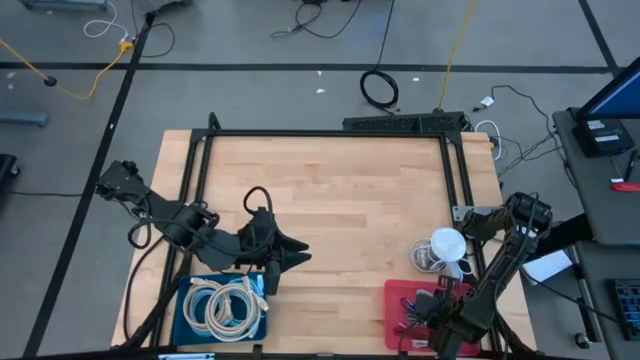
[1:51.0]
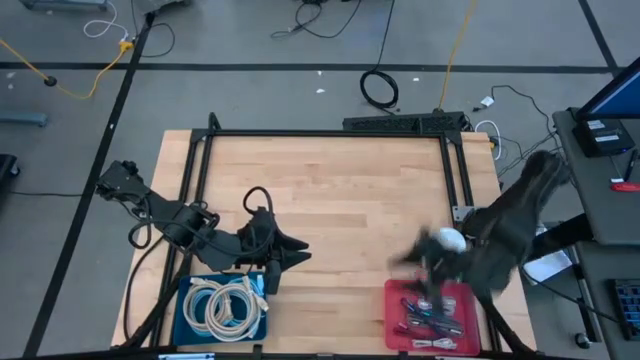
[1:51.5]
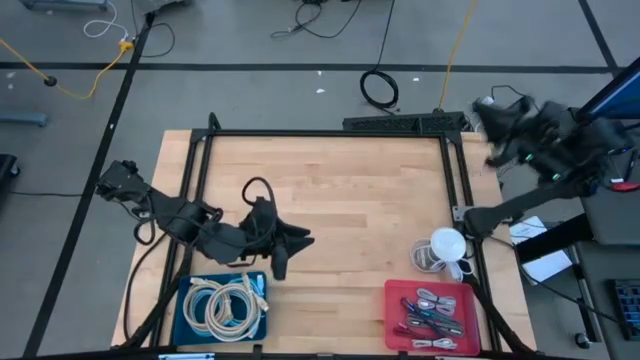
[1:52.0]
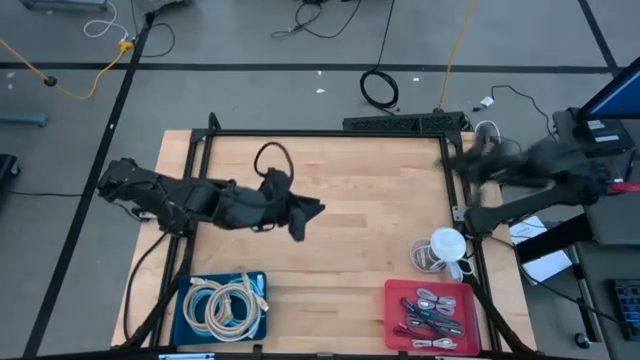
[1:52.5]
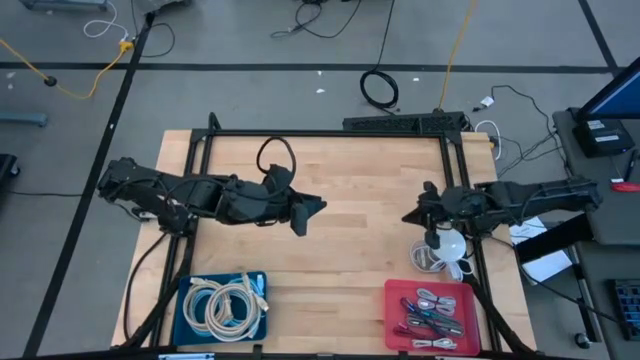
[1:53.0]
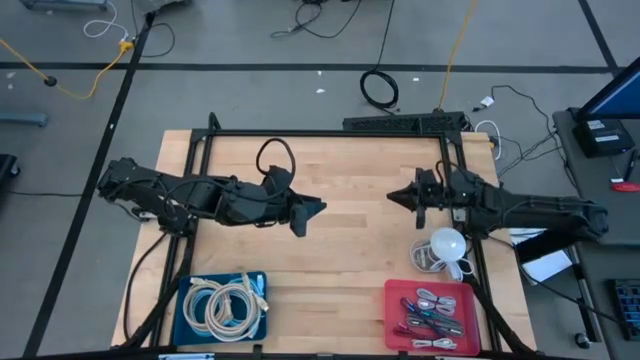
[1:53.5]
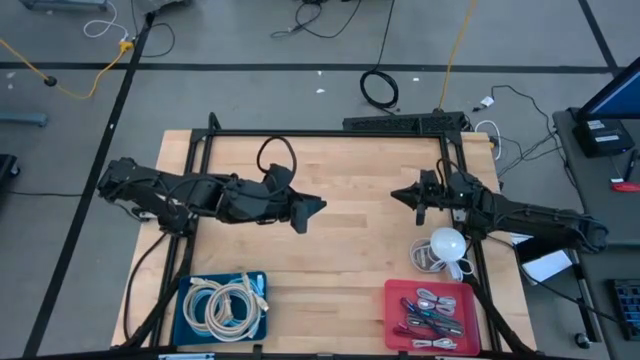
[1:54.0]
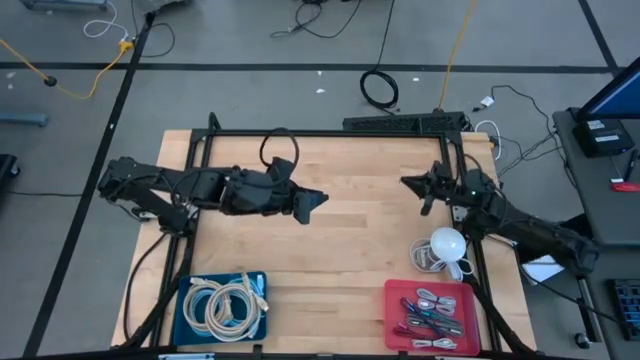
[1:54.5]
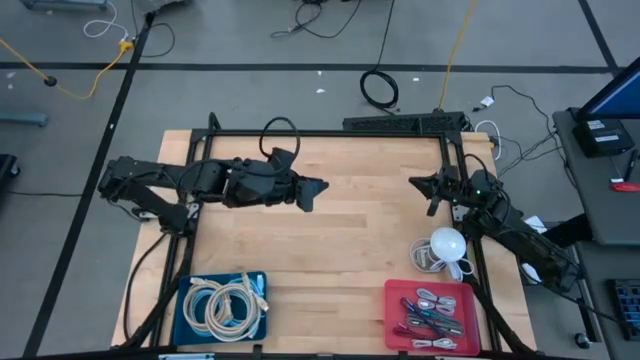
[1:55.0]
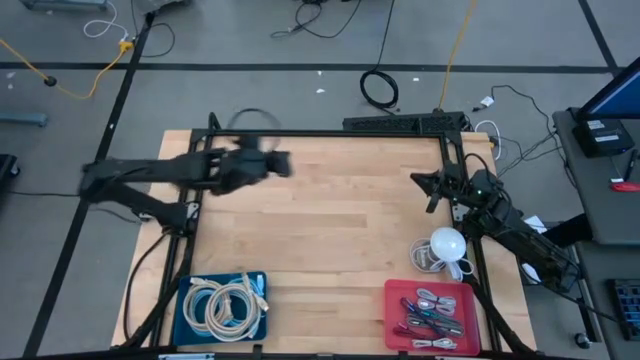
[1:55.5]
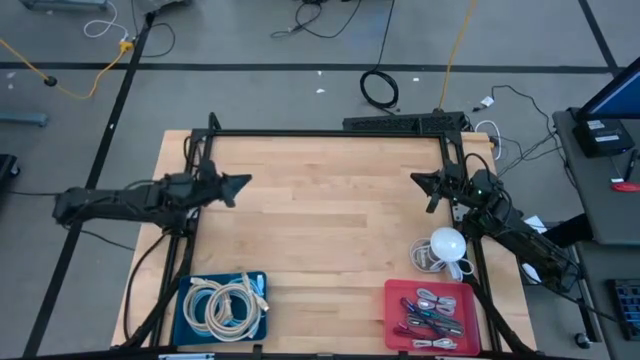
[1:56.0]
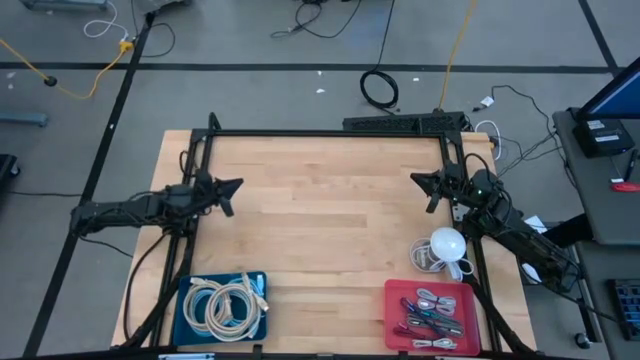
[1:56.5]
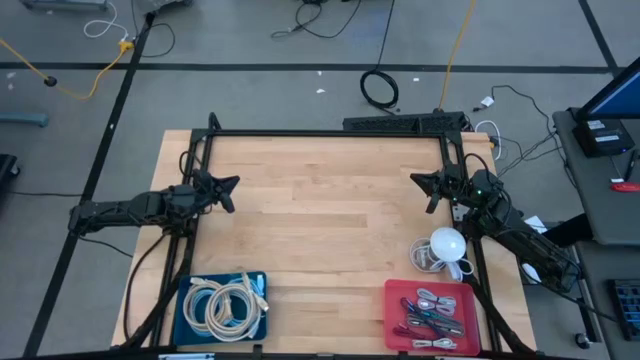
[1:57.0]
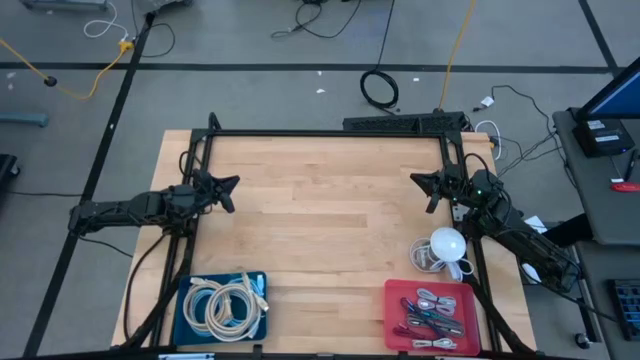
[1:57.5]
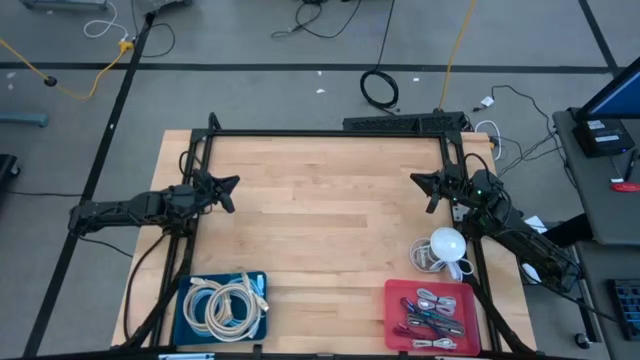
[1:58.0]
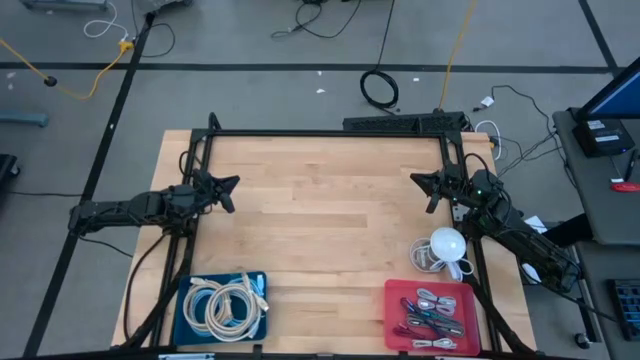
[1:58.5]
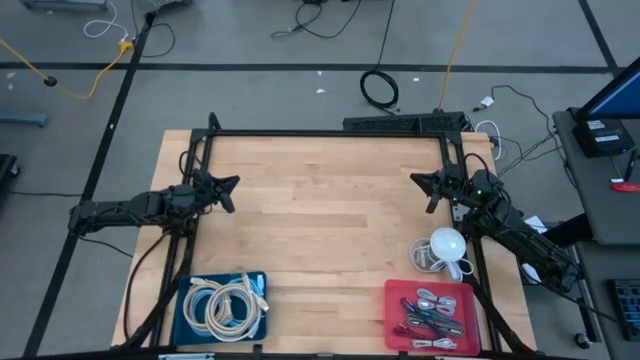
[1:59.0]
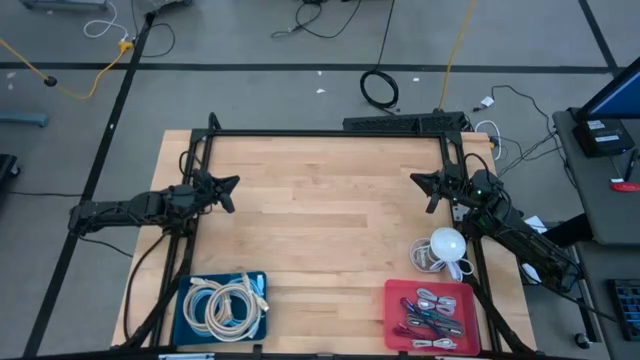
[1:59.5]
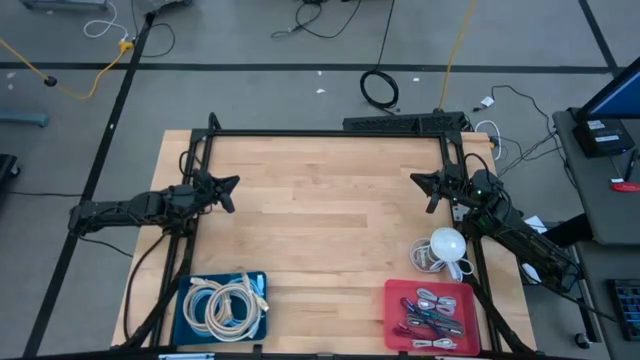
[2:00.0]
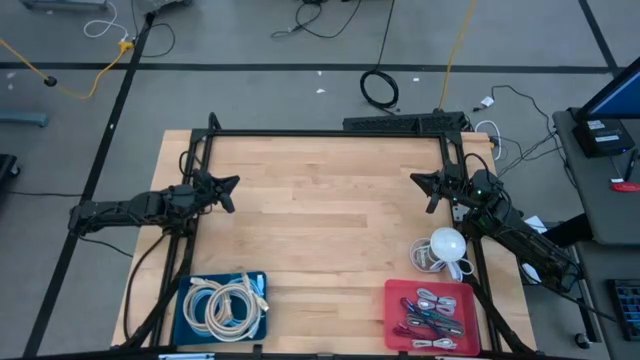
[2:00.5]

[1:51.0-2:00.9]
Task: Pick & Place USB Port
Return to Home Position

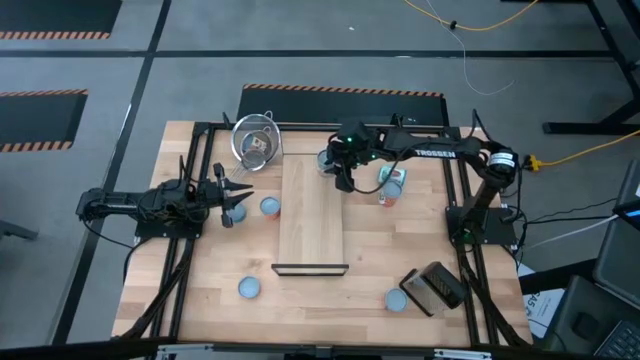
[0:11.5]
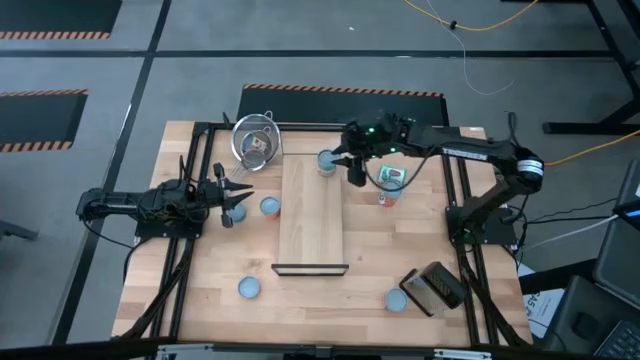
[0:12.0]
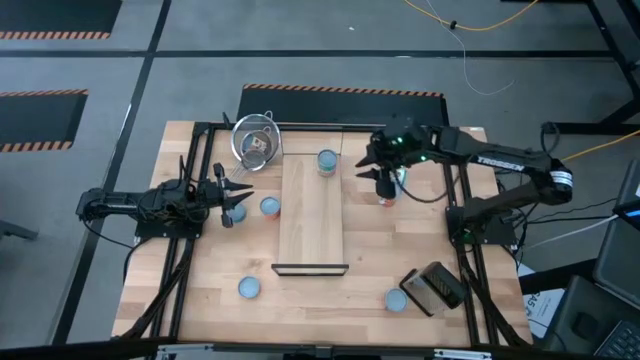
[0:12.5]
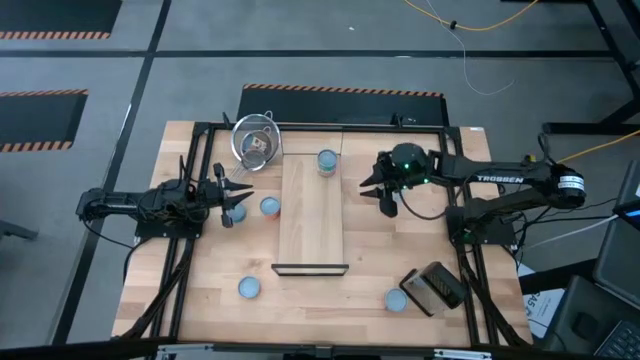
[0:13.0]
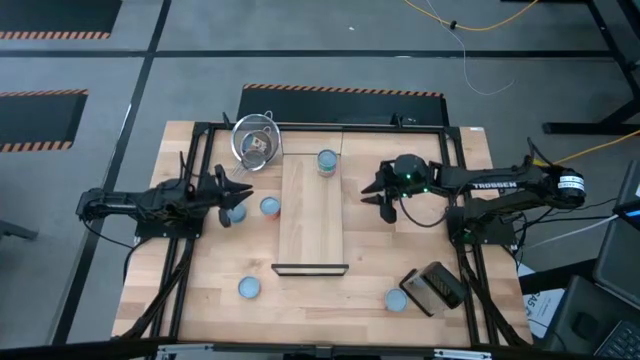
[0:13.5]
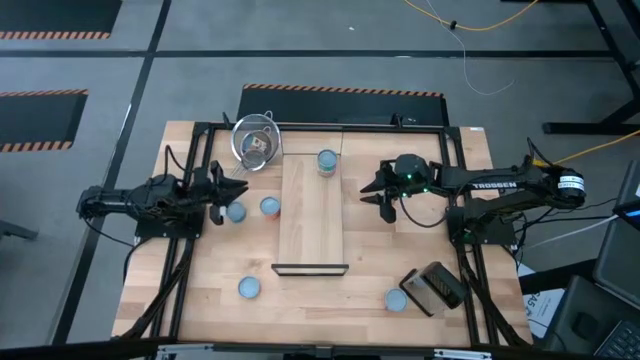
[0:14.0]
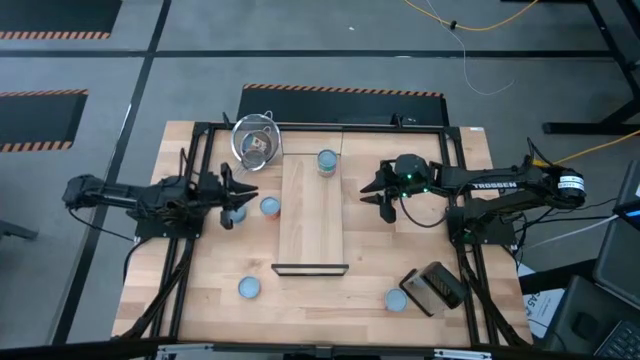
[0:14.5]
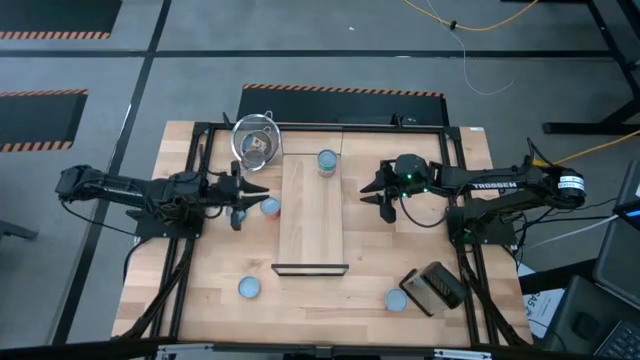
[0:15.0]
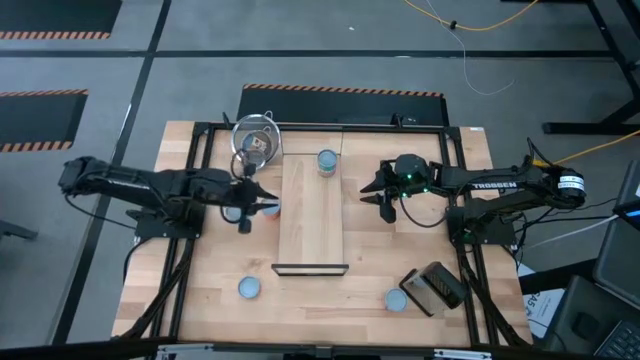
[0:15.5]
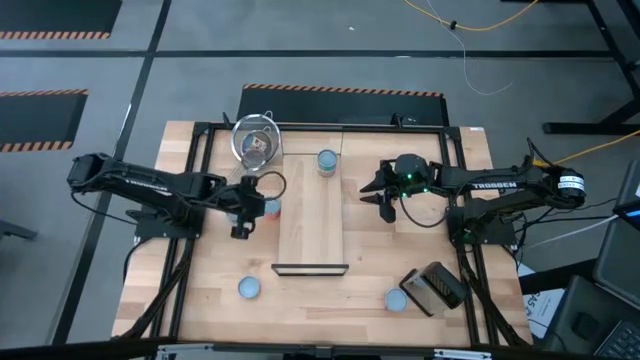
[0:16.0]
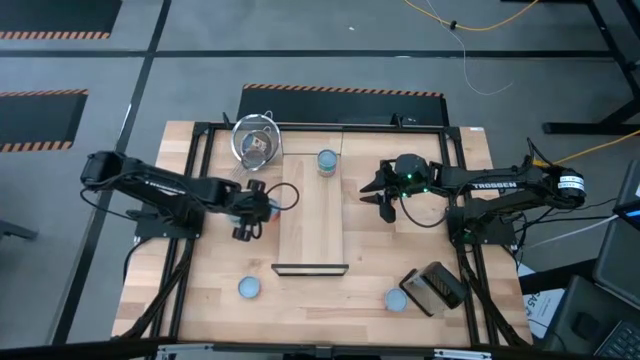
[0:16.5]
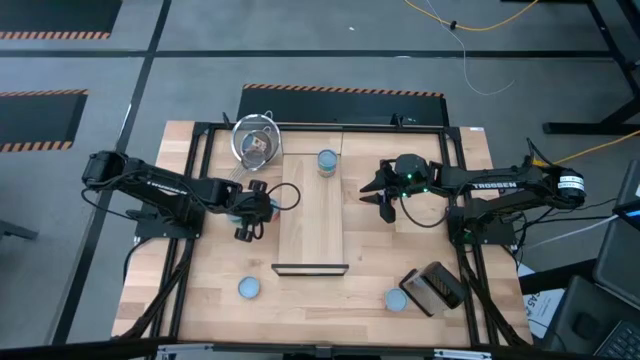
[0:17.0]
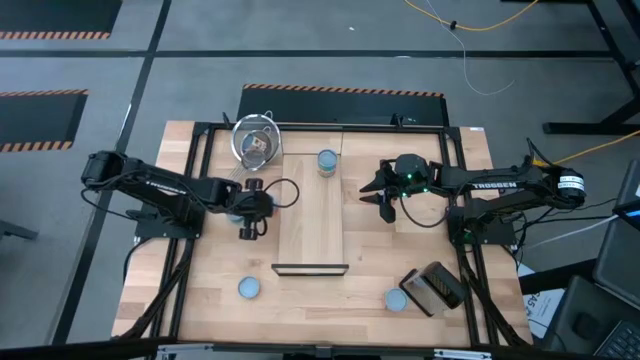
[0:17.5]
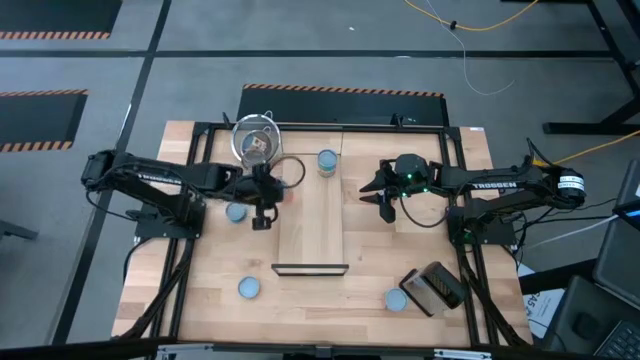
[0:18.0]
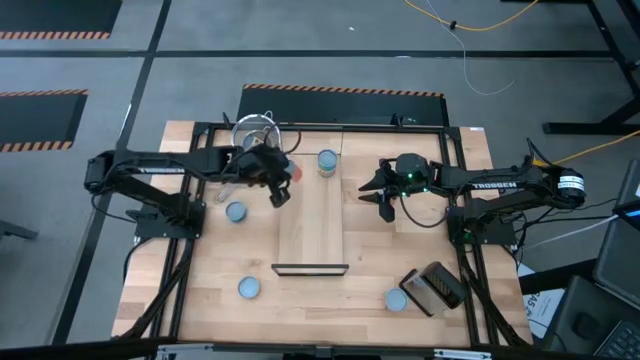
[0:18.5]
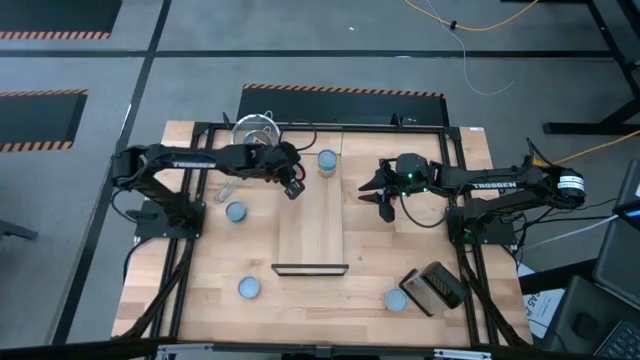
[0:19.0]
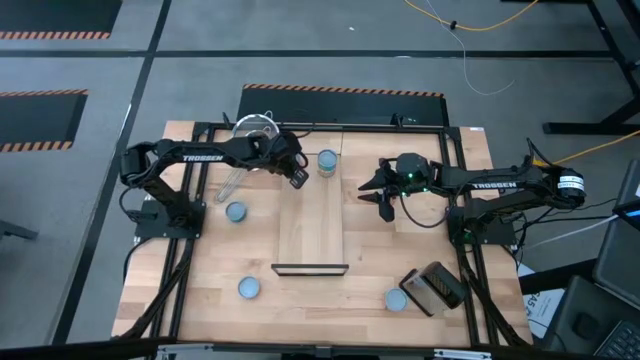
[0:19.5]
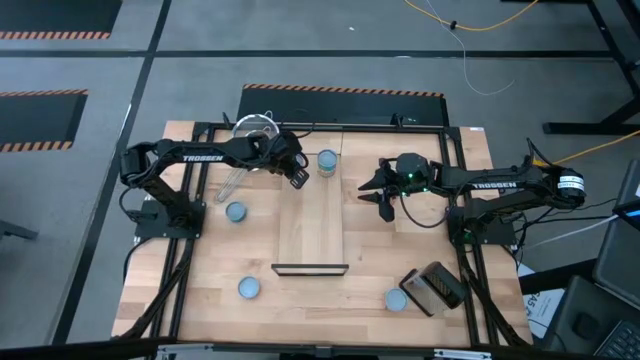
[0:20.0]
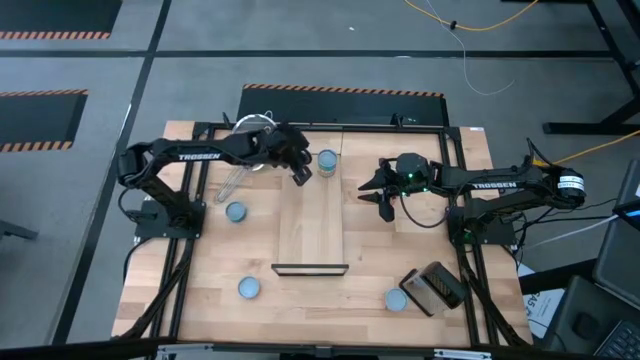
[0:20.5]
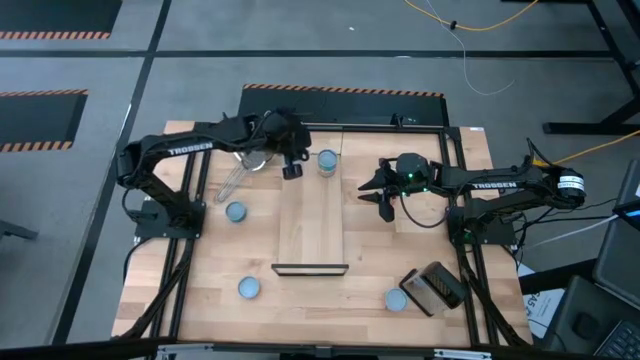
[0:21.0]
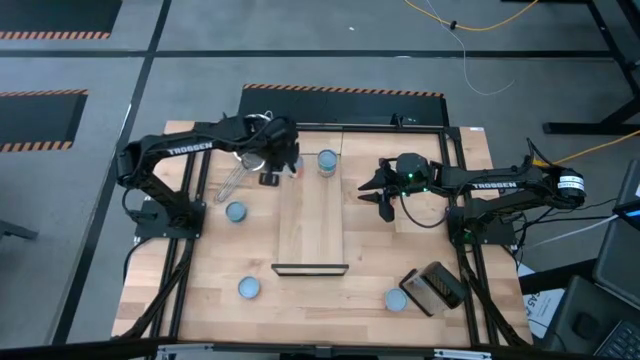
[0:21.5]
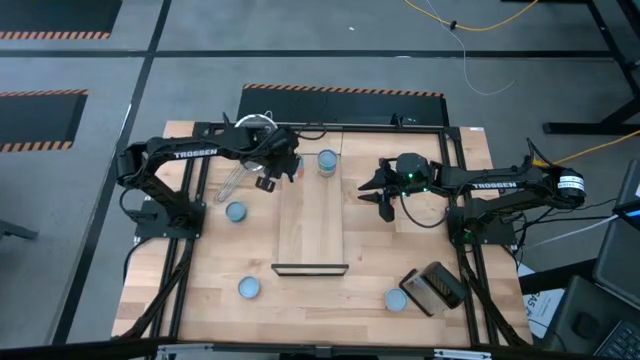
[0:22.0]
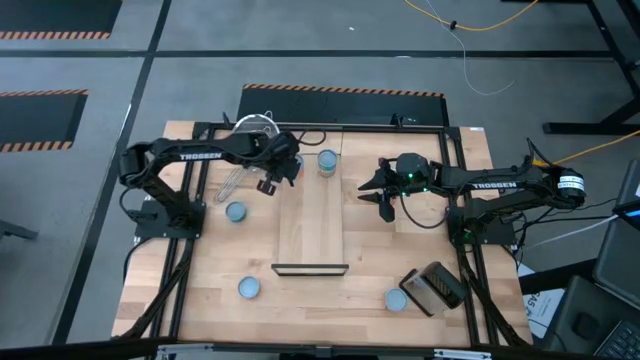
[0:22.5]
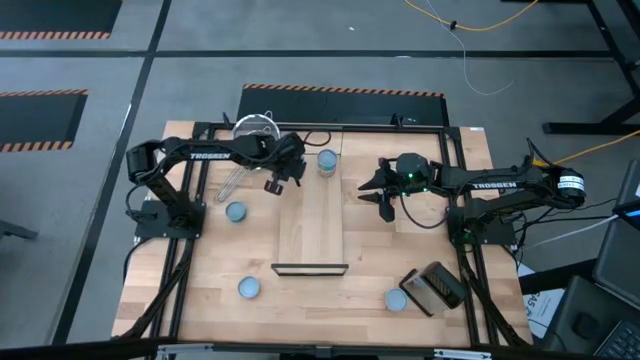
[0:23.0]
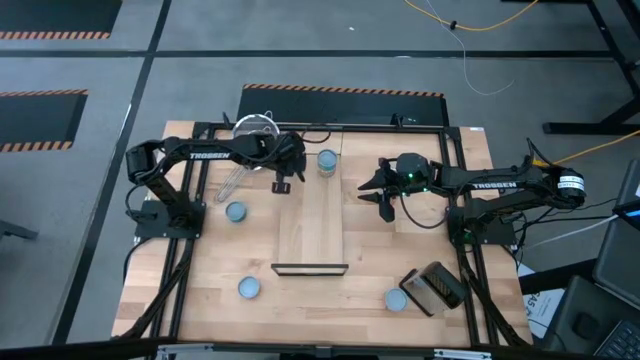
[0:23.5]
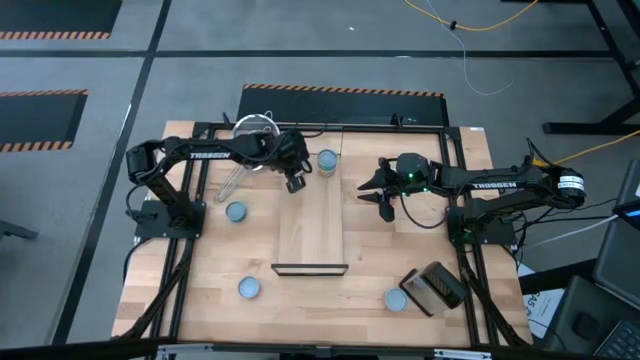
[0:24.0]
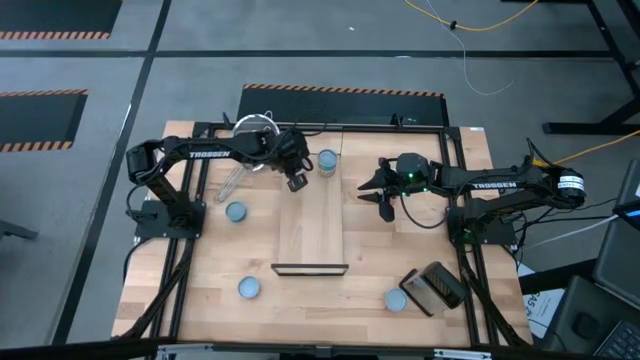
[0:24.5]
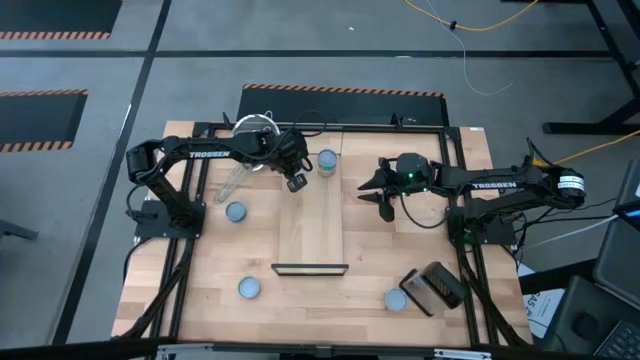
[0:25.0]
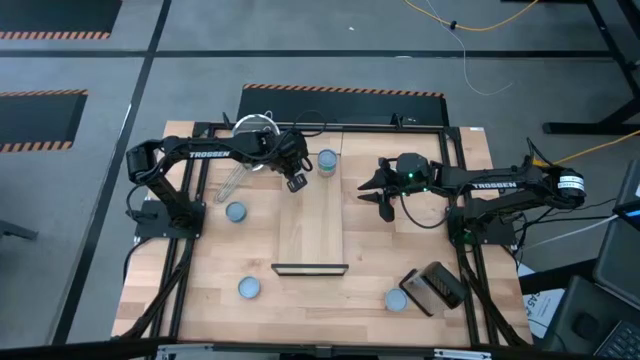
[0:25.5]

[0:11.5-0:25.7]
Task: Pick and place cans onto a shelf
Put the canned saucy os on the shelf
